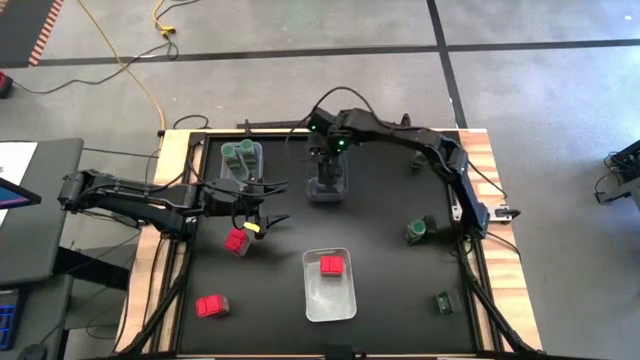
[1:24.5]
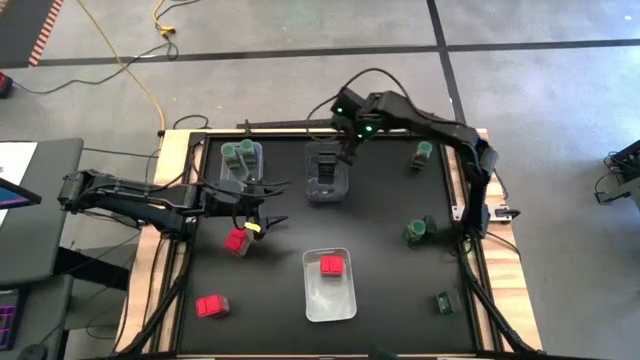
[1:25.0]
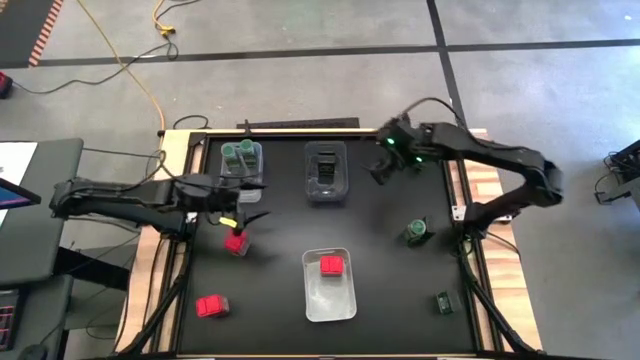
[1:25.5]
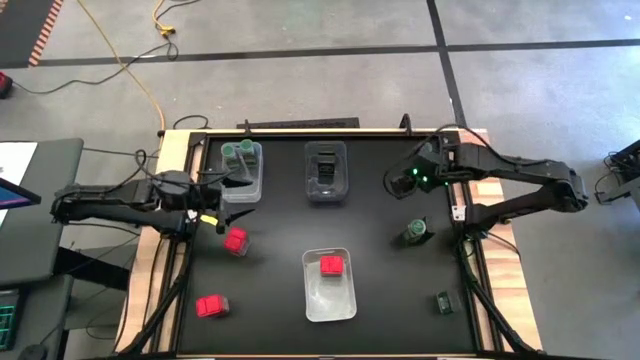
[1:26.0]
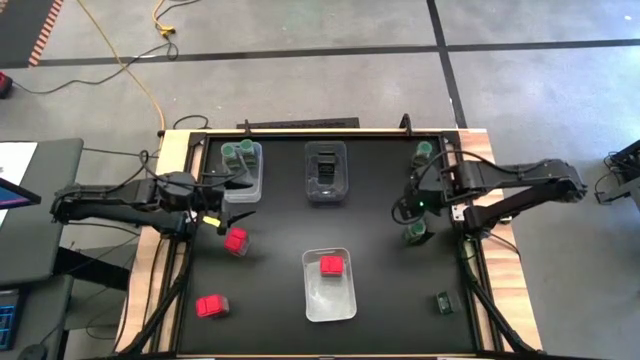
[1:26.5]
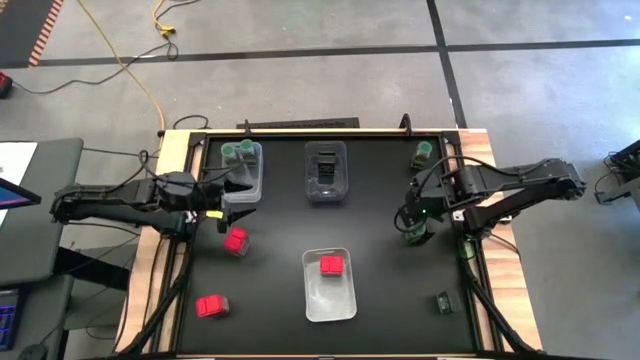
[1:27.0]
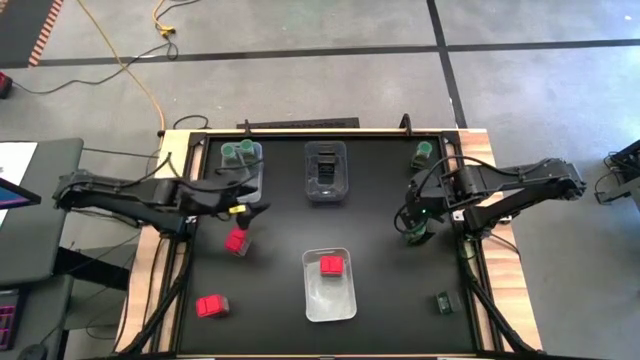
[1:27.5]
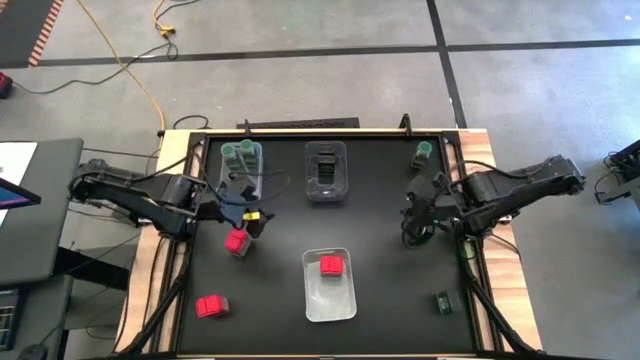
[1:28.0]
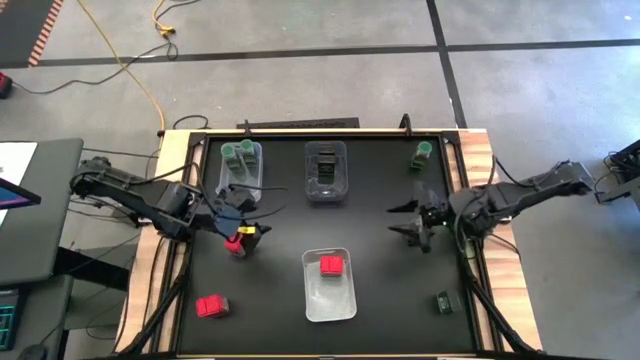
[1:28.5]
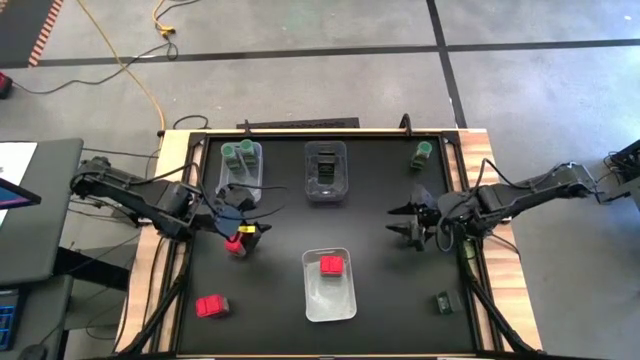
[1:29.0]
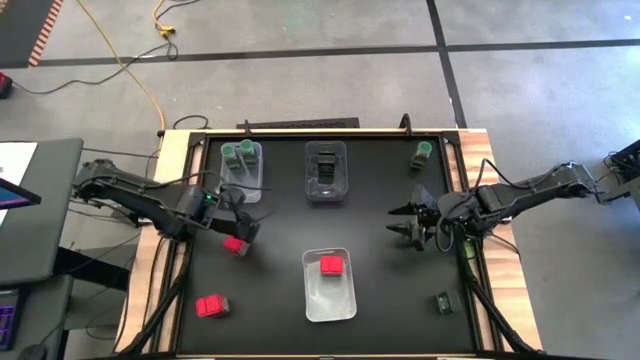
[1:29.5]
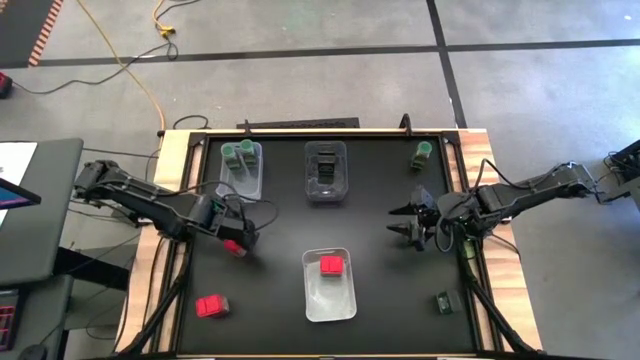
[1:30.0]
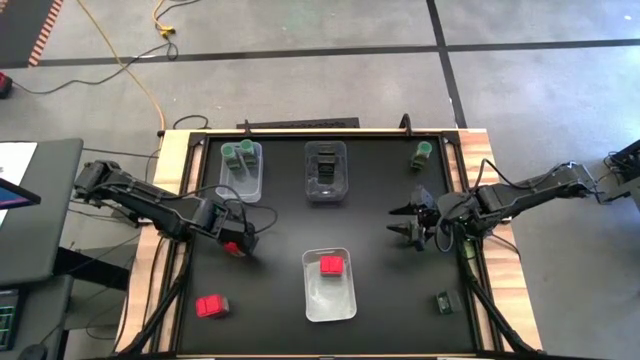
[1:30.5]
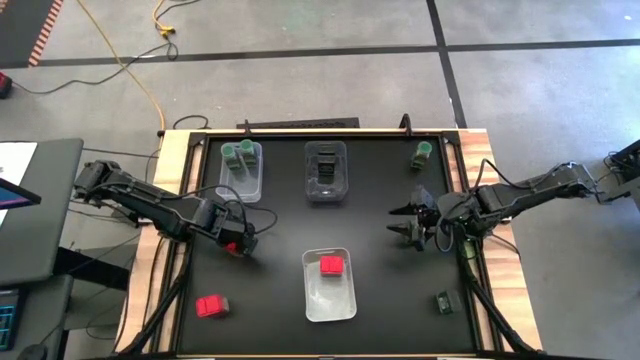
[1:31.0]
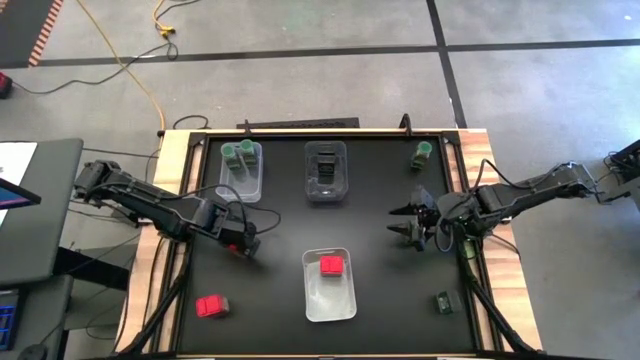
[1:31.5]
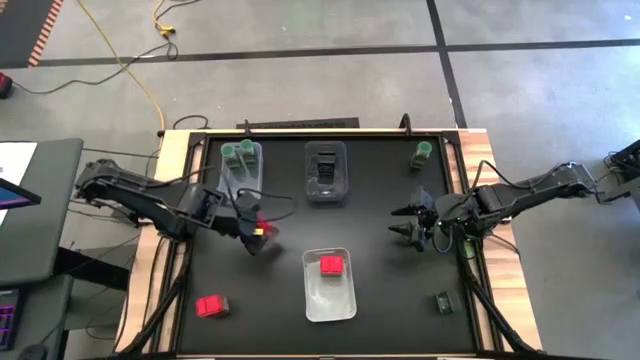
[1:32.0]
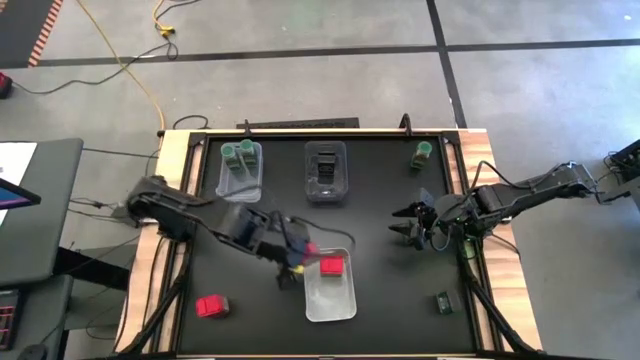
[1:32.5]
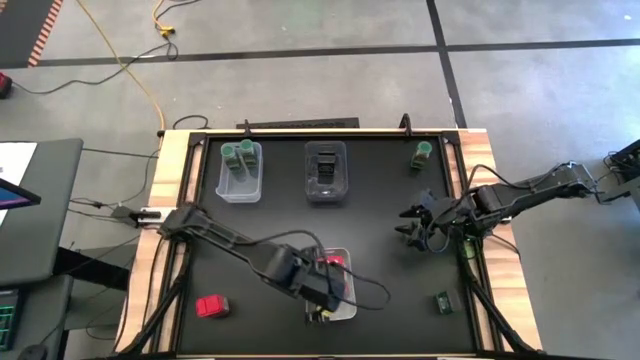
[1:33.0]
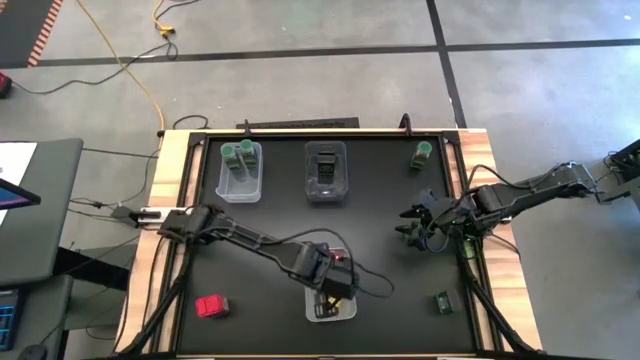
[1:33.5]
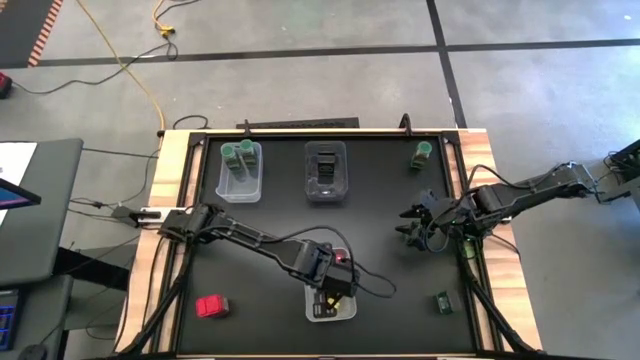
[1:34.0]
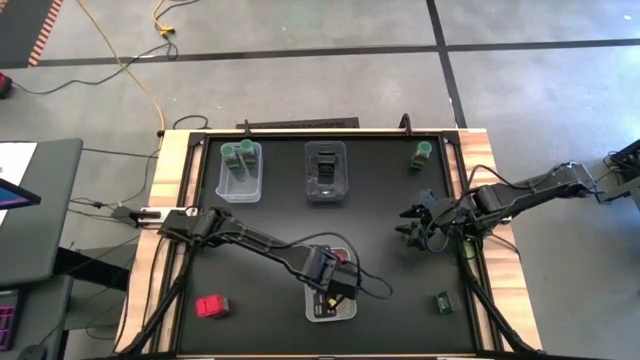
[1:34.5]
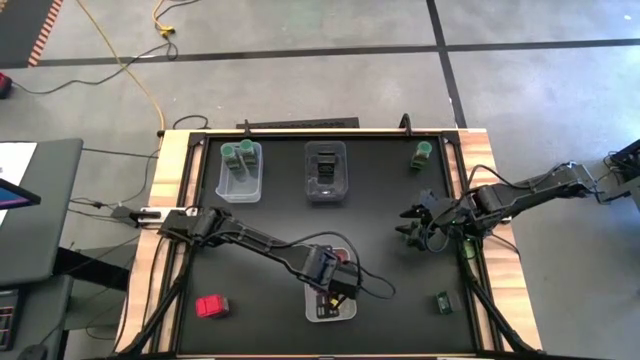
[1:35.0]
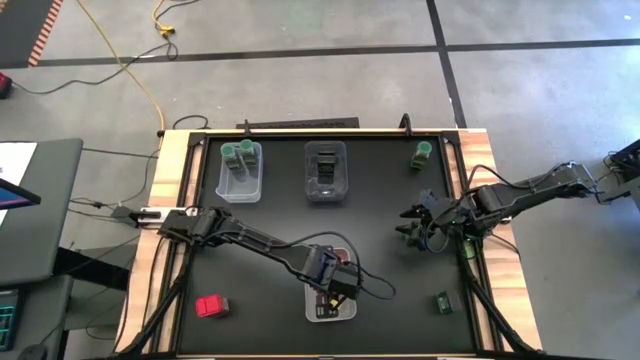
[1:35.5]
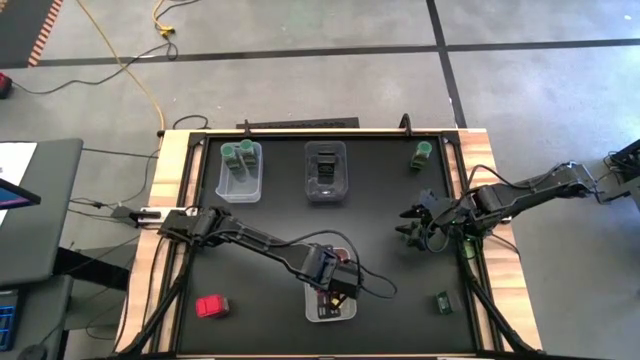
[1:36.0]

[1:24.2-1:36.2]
Task: Sort spices by type
Put the top red seasoning can into the white bin

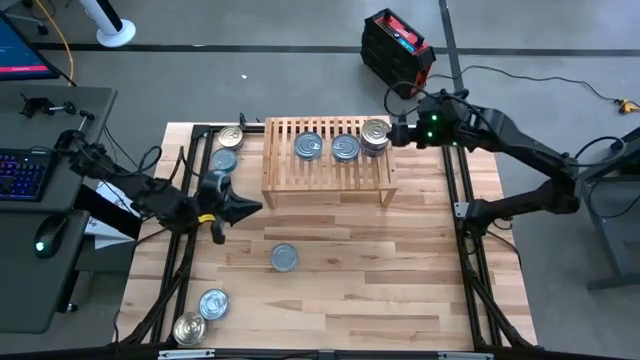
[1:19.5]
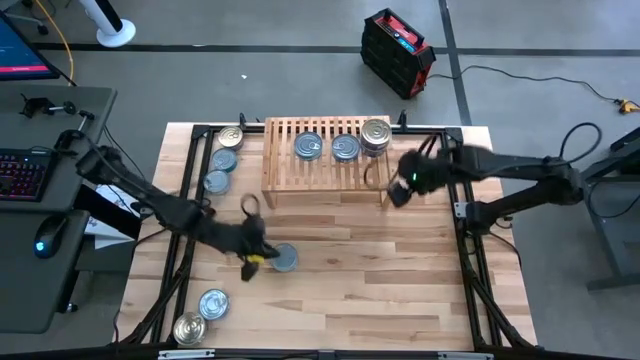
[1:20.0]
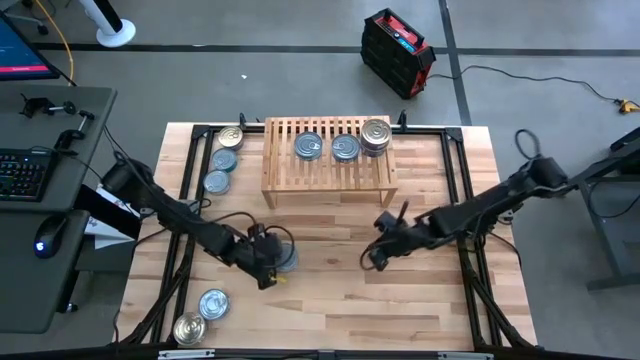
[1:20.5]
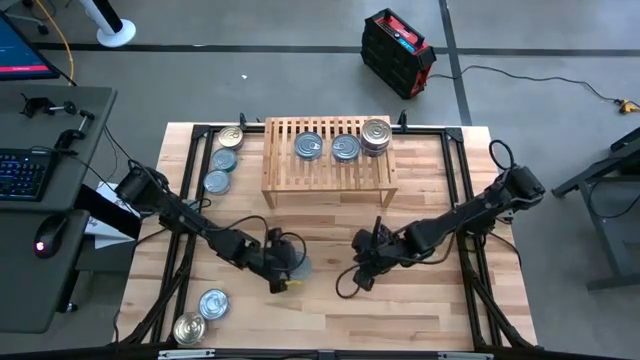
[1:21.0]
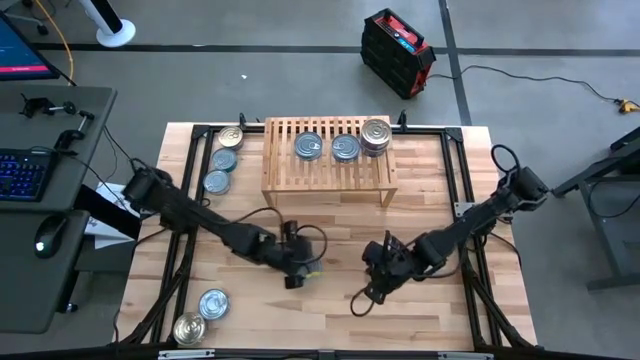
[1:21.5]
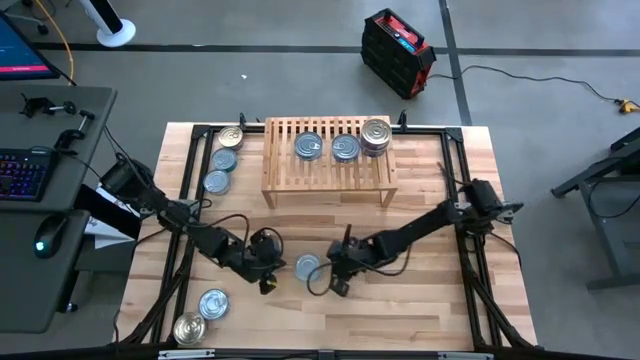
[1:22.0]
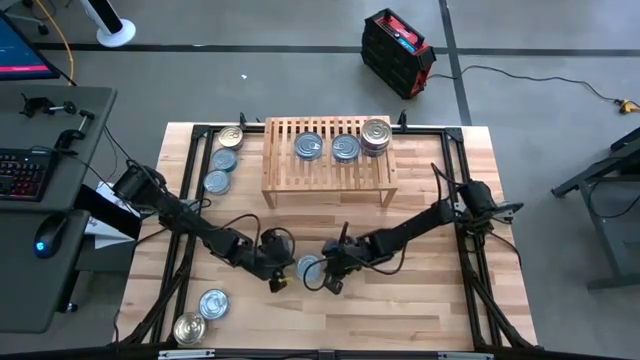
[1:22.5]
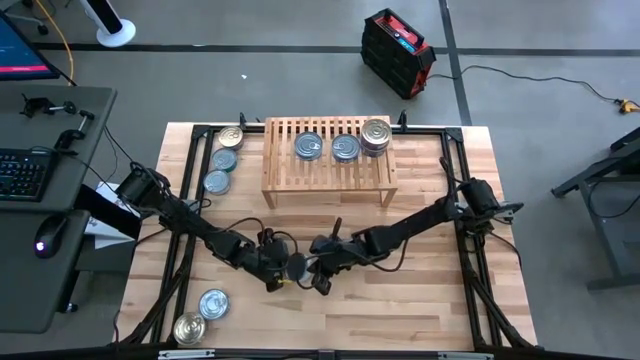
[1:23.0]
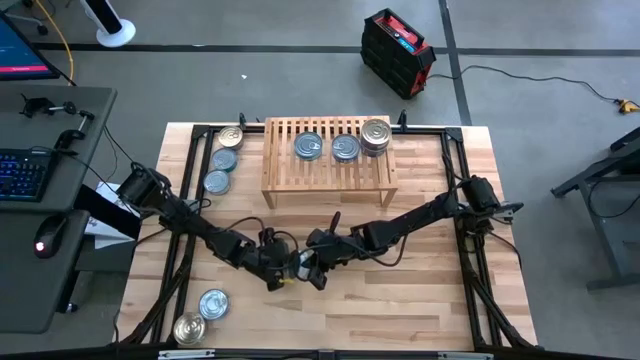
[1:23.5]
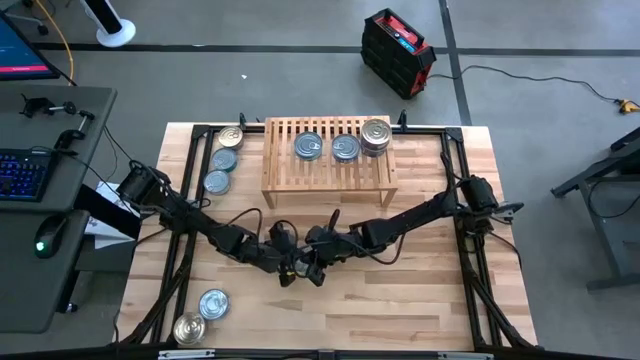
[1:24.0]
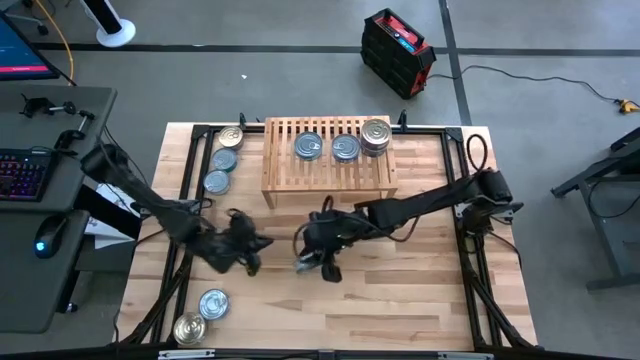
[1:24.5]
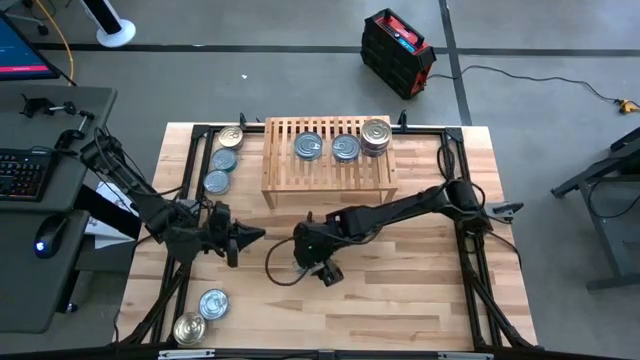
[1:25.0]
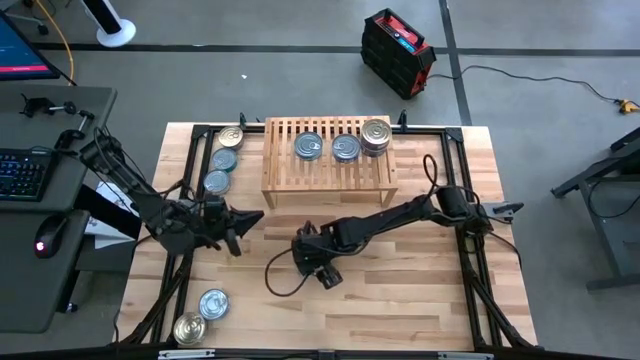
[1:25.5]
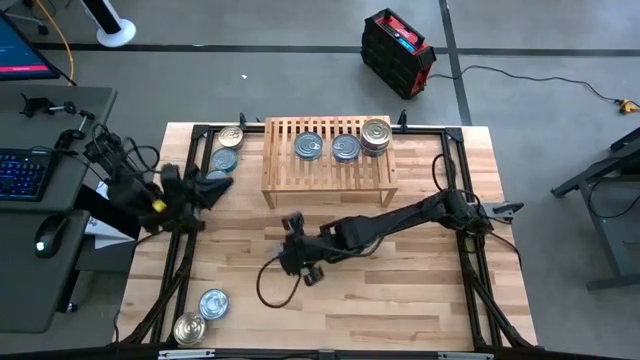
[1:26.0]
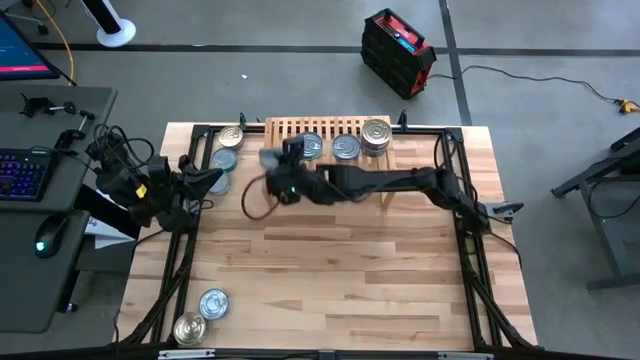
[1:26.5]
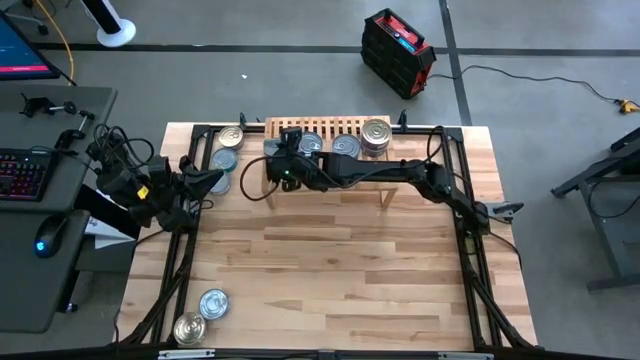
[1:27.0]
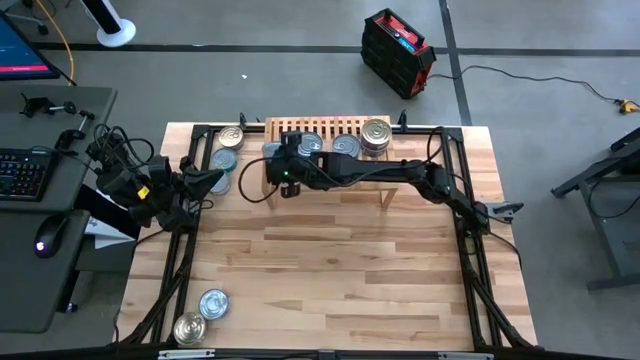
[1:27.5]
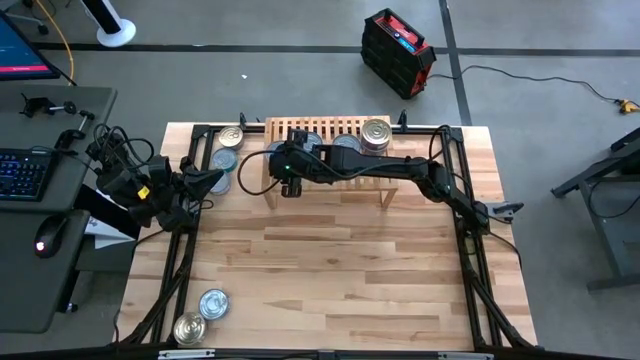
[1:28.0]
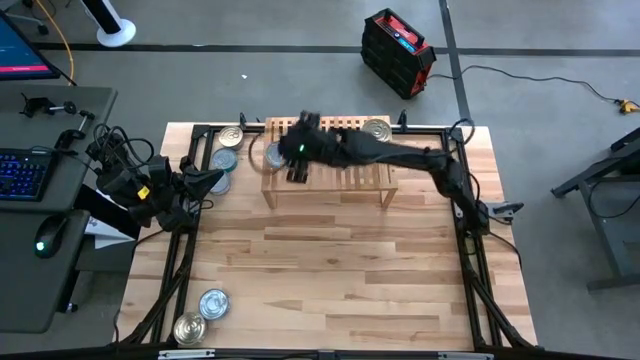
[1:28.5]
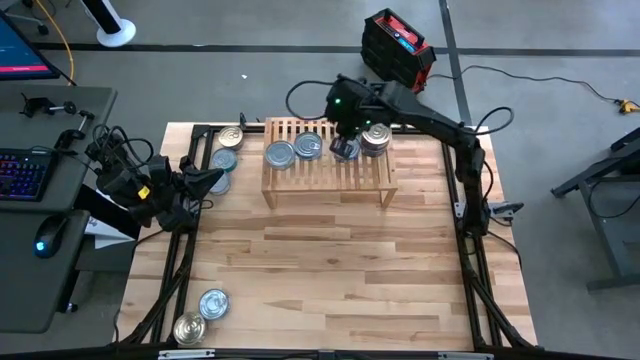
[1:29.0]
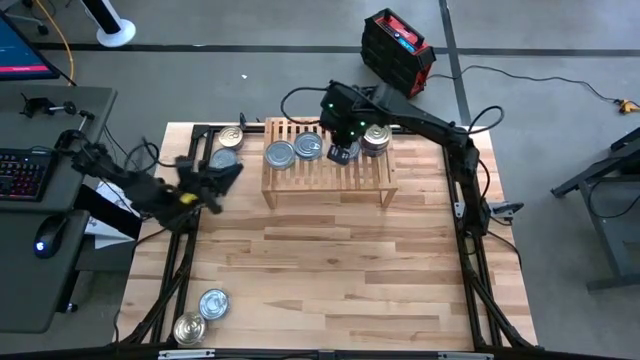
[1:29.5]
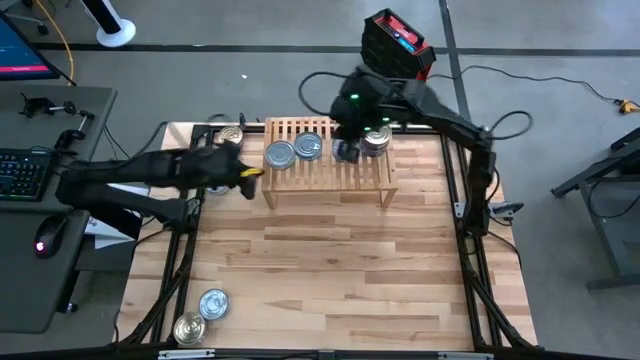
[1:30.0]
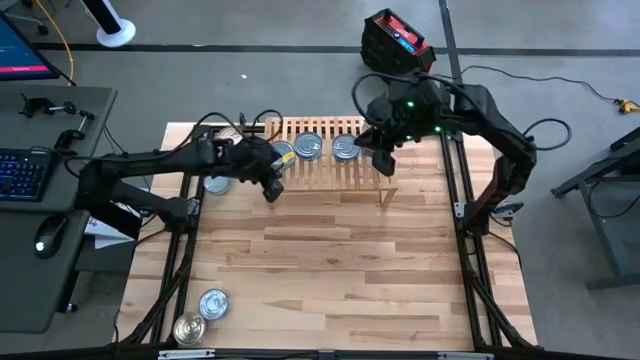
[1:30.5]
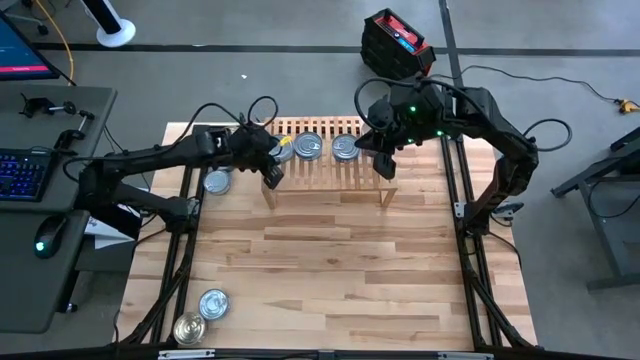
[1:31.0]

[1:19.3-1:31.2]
Task: Stack canned seafood by type on shelf
Put the white tuna can on the shelf
